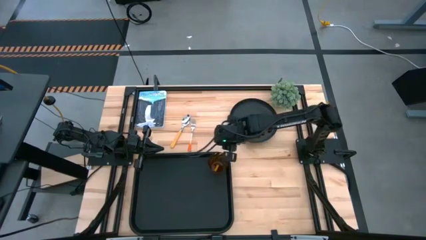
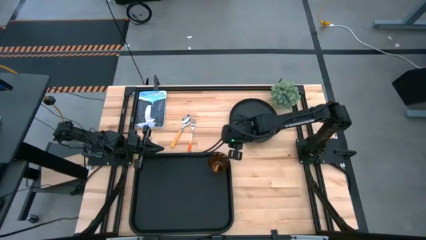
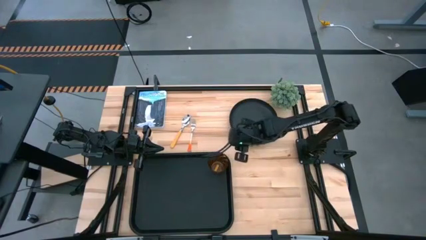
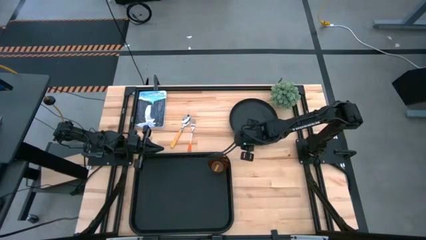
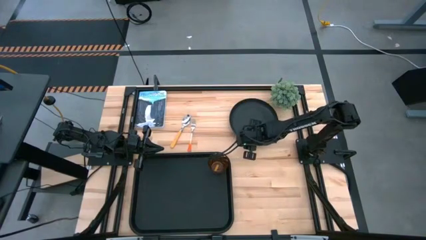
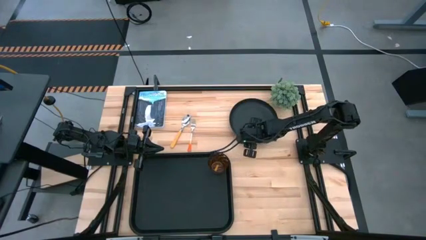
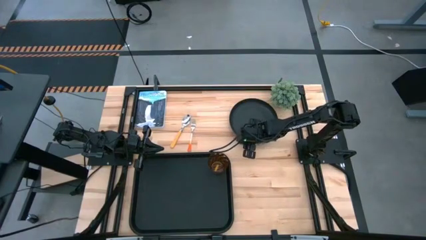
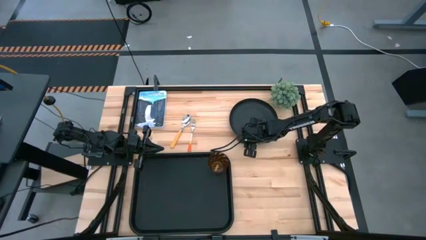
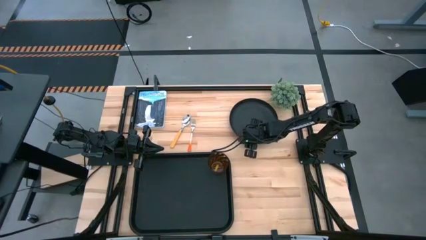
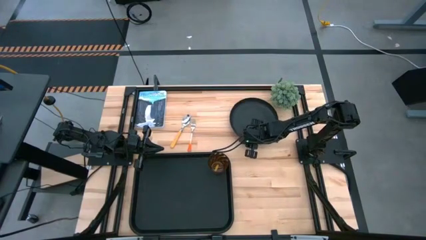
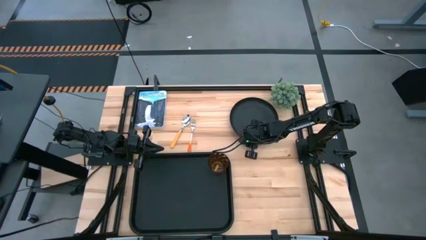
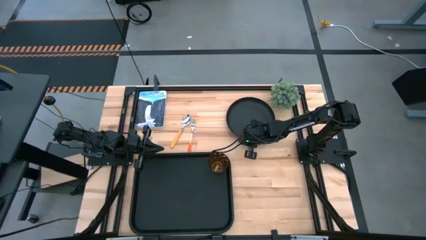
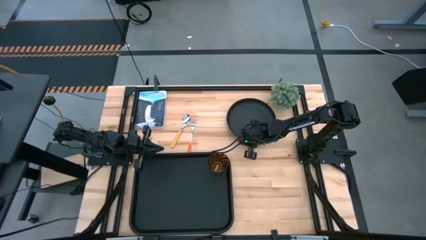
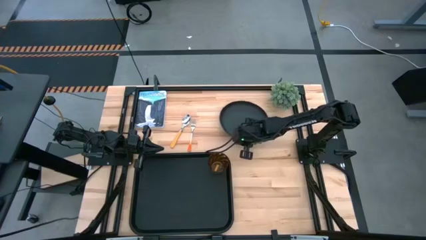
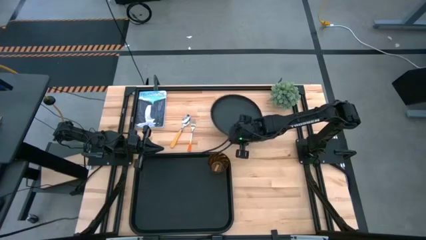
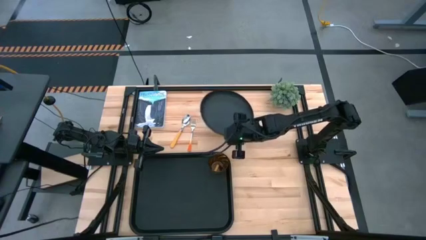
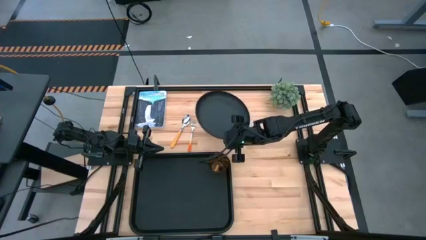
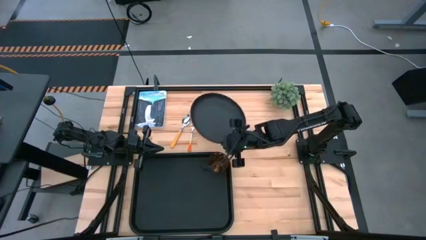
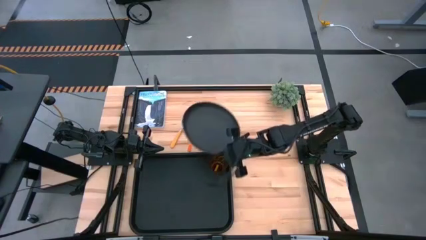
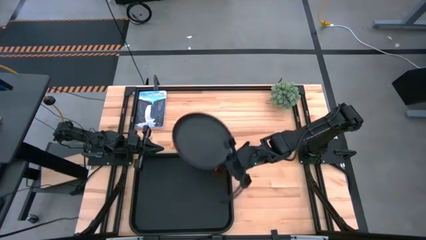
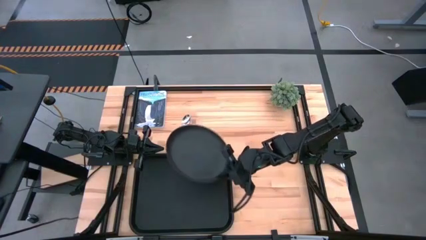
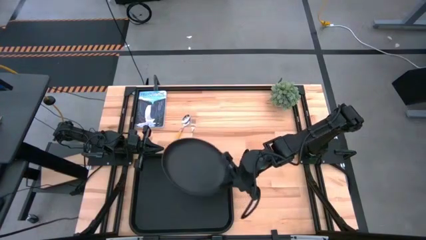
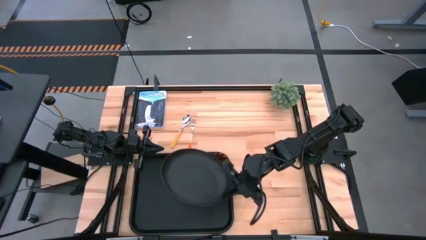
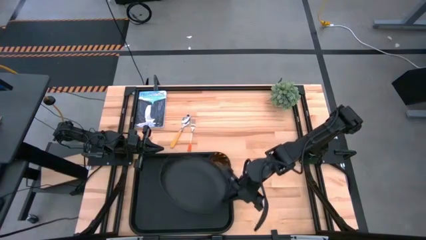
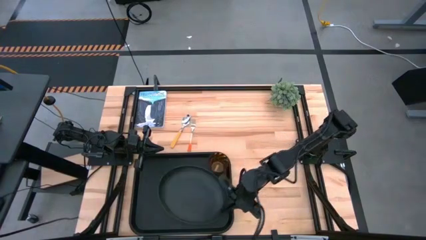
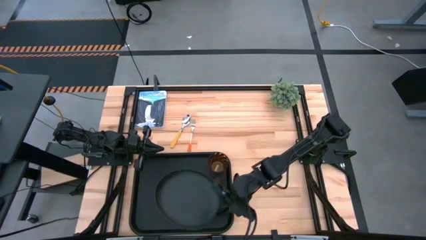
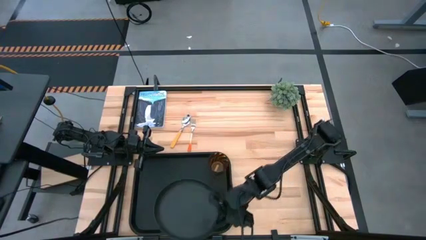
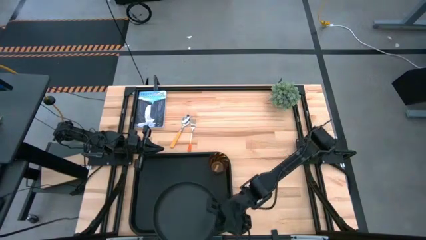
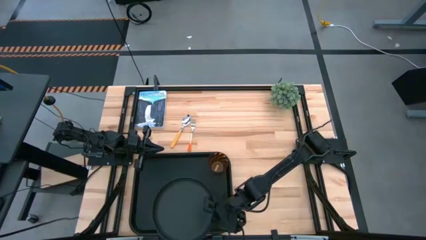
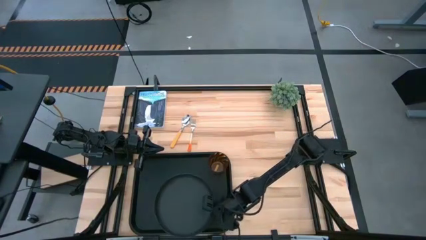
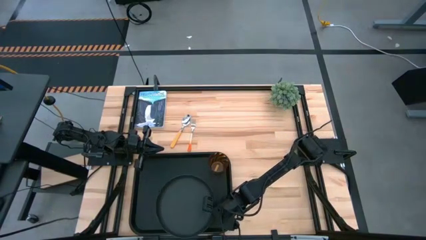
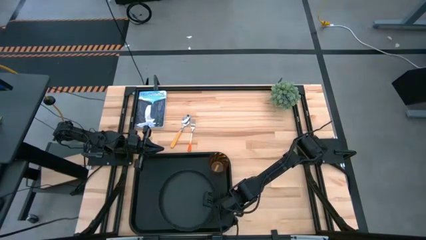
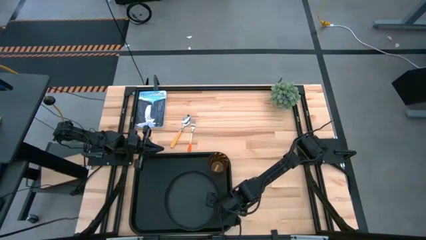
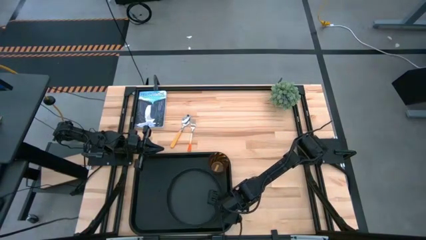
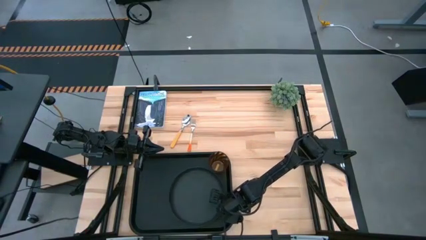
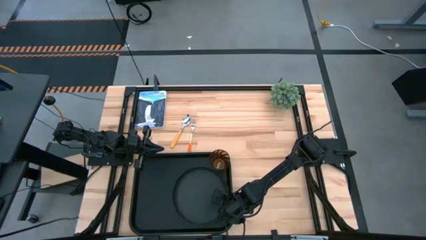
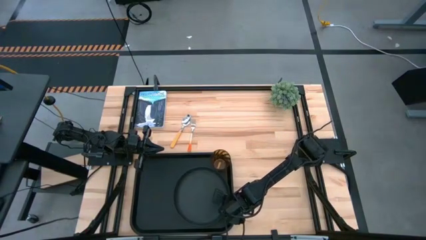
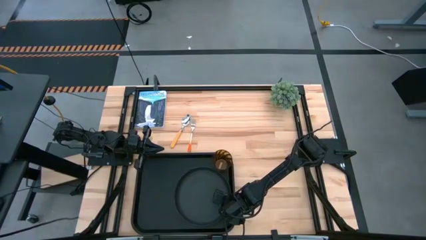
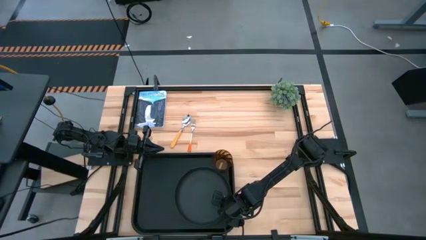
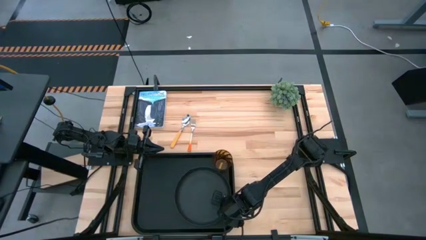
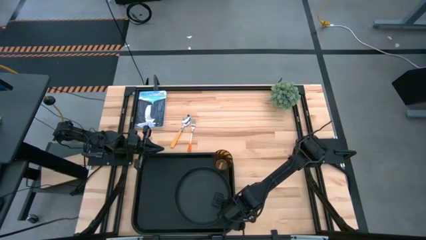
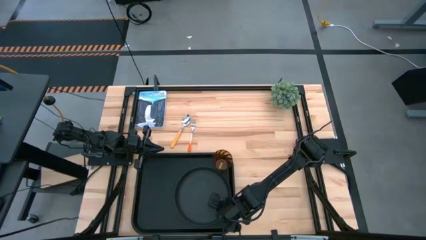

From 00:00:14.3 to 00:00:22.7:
Task: Pick and place plate/cup/fork/spoon on tray
Put the black plate on the black serving tray below the orange glass

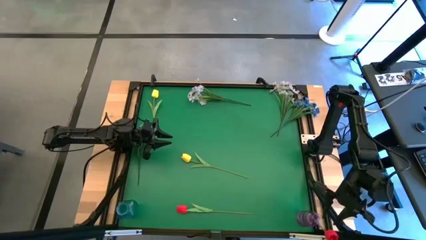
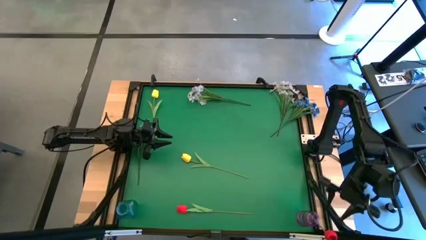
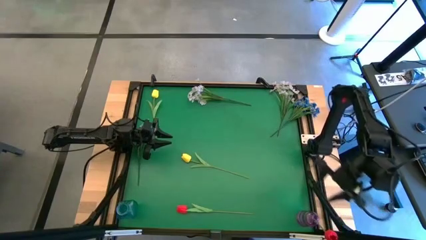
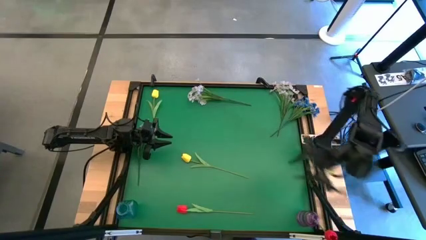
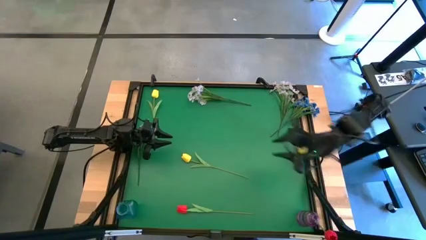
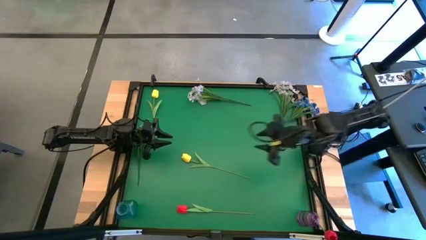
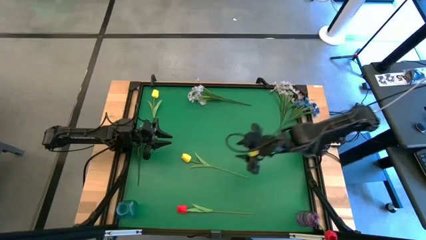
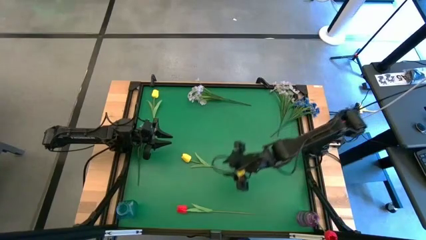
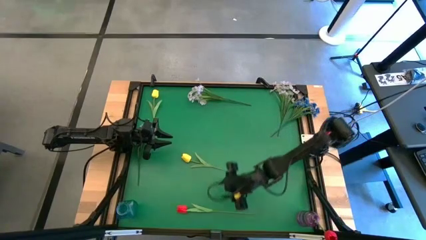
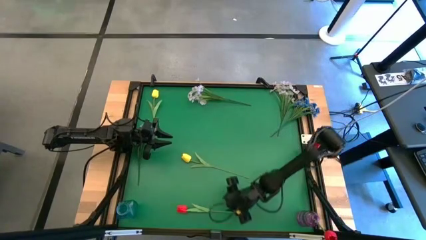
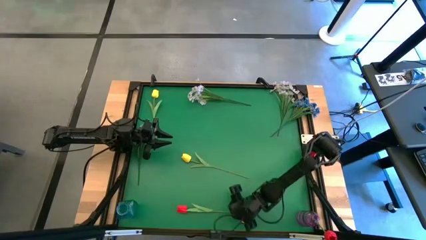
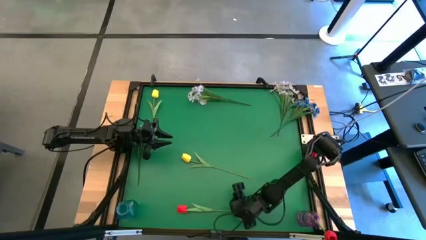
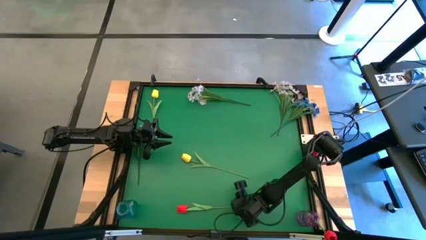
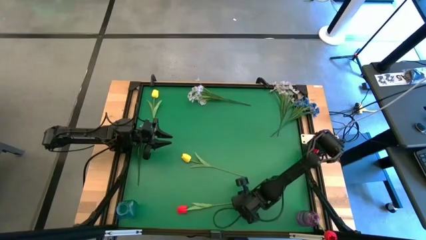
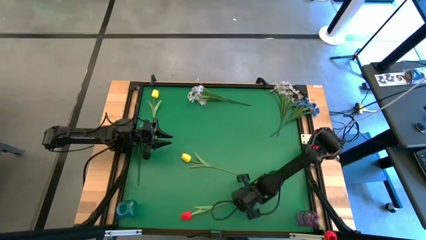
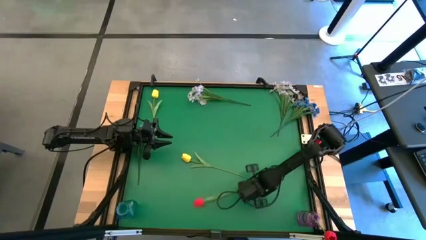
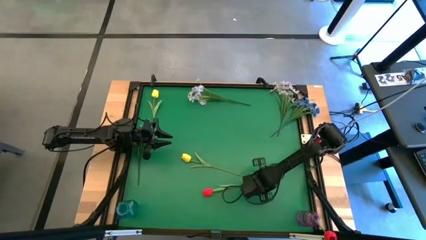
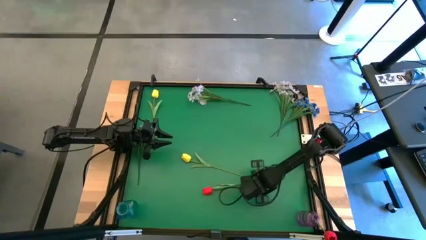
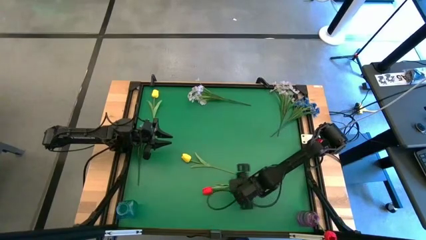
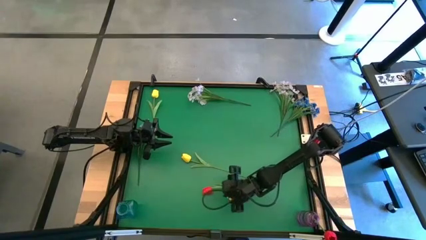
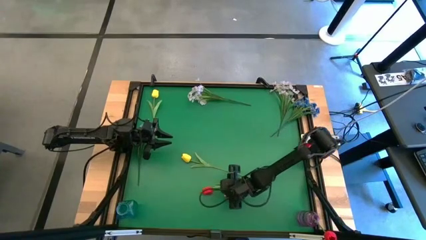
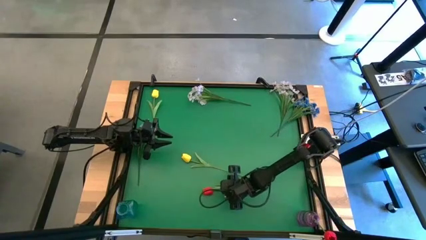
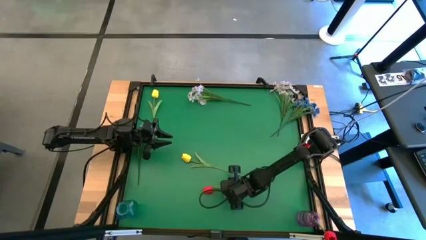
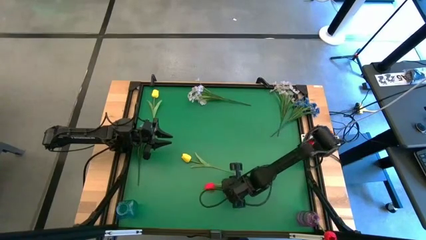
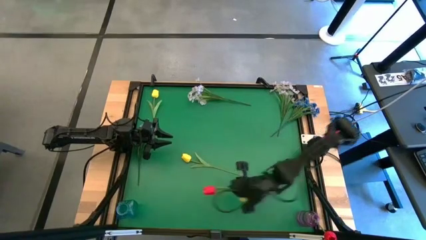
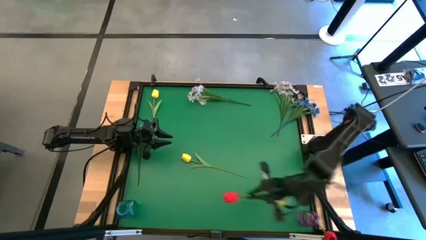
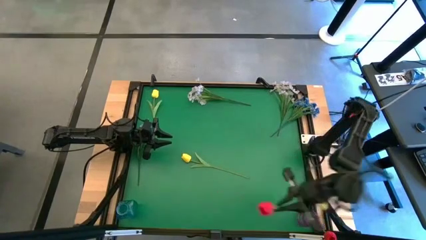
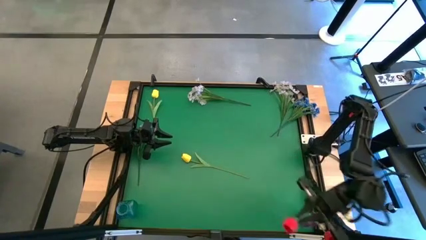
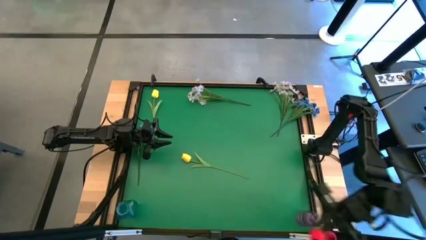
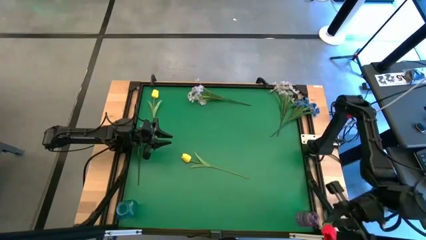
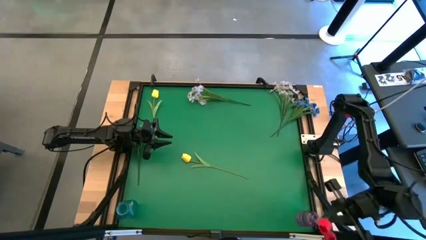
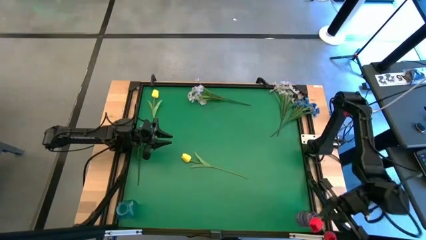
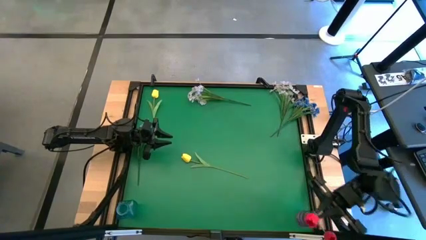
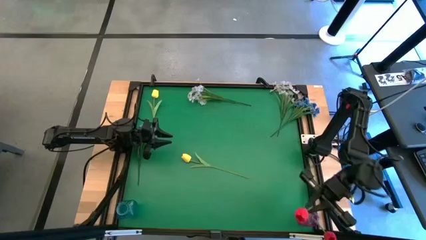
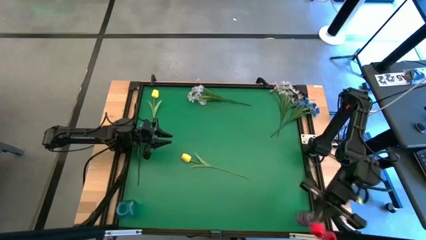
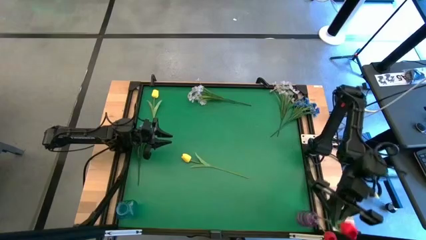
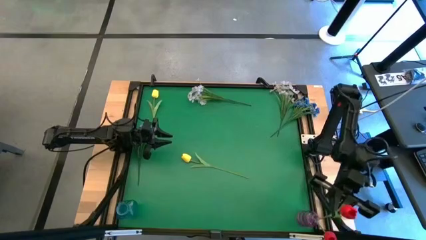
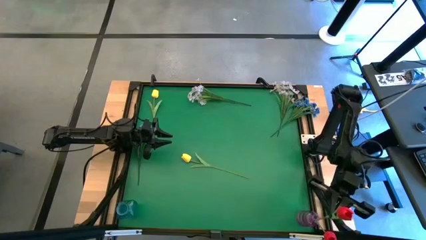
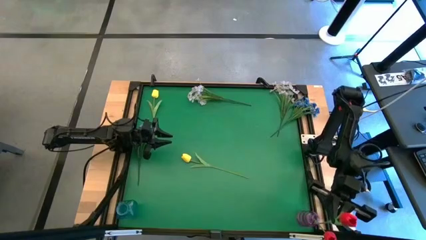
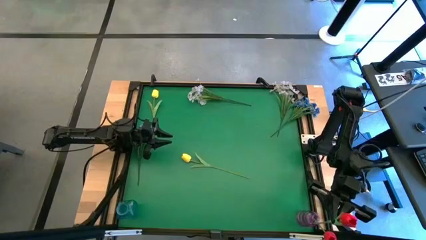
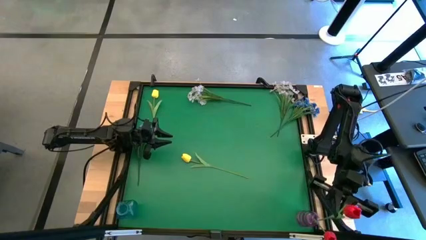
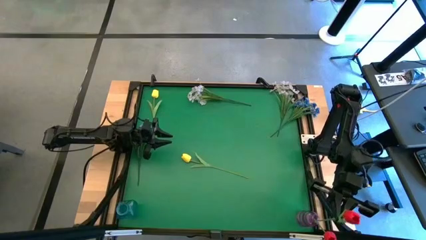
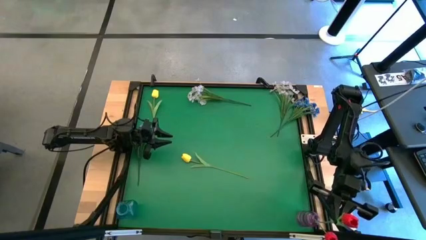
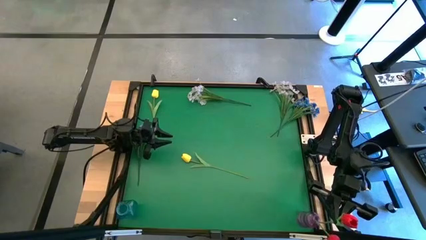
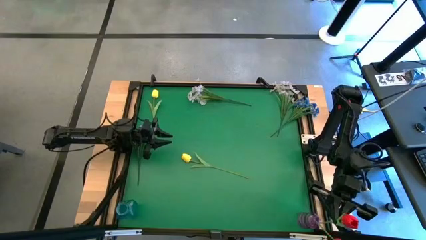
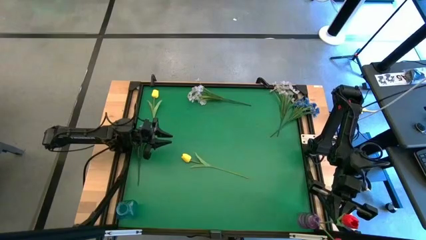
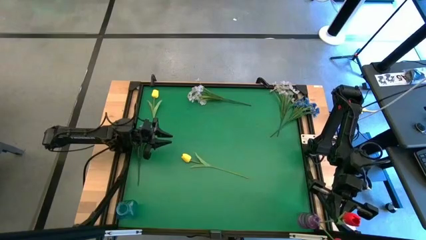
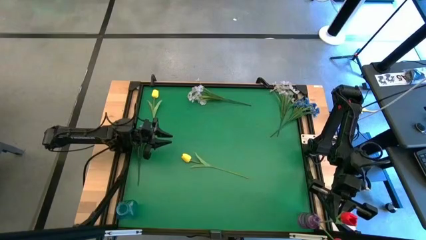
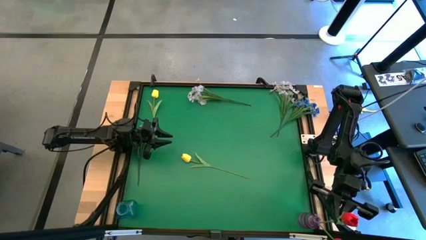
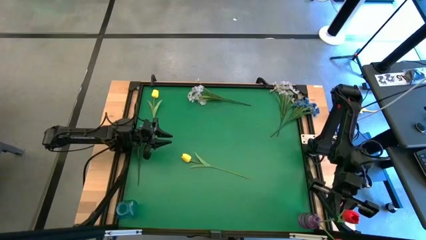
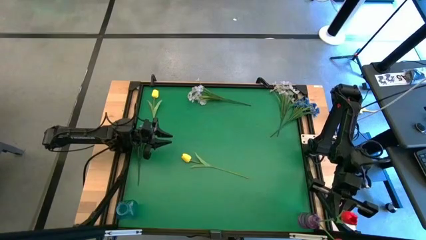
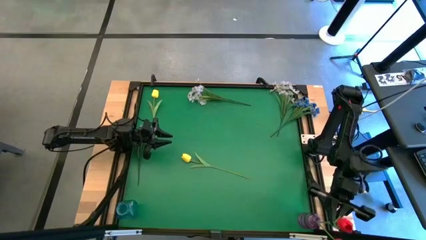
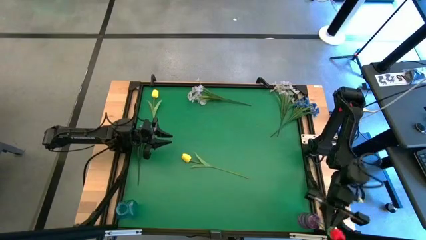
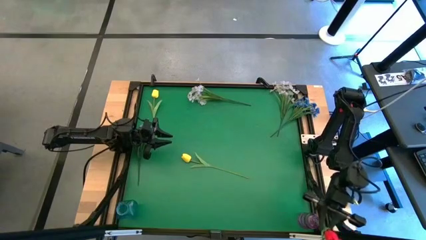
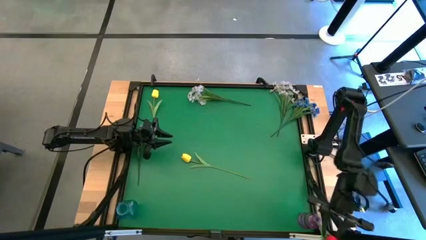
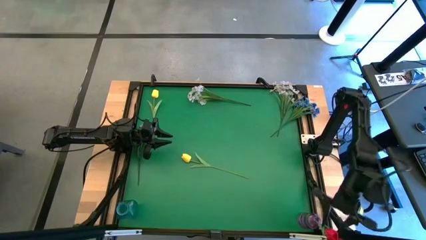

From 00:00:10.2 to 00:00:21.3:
Task: Sort flowers into vase by color
Put the red flower into the purple vase
